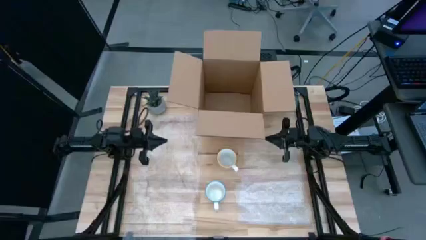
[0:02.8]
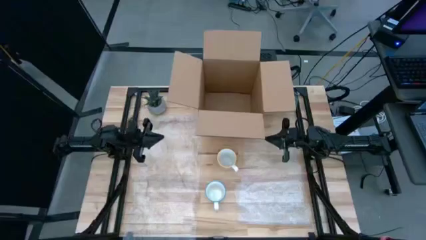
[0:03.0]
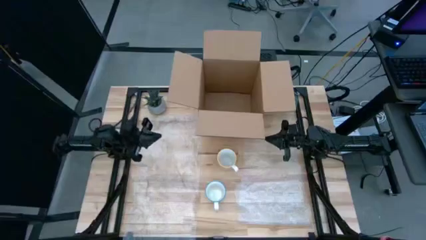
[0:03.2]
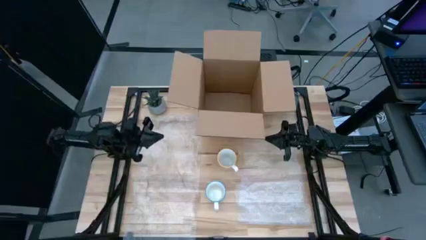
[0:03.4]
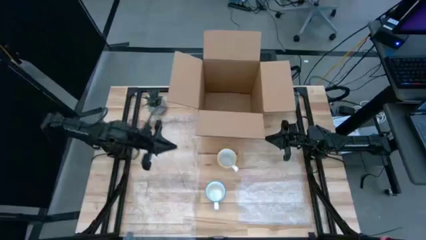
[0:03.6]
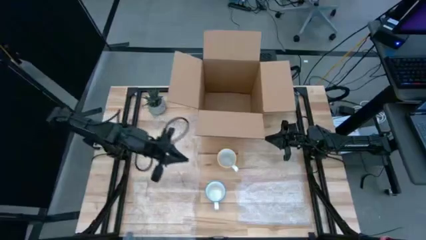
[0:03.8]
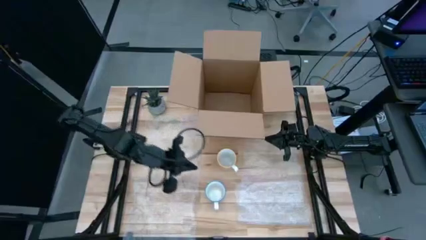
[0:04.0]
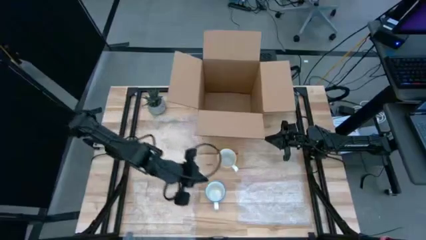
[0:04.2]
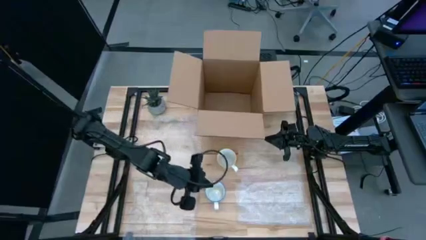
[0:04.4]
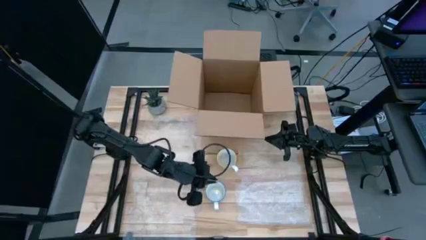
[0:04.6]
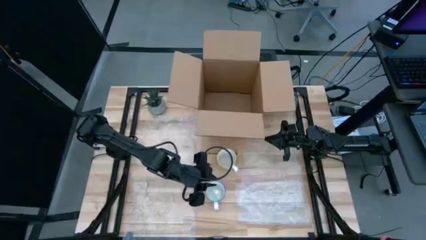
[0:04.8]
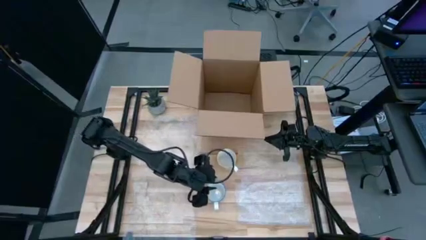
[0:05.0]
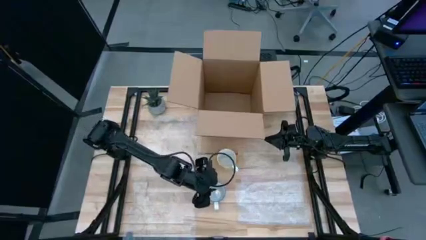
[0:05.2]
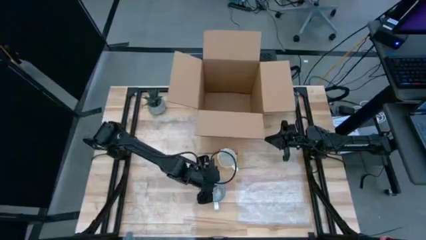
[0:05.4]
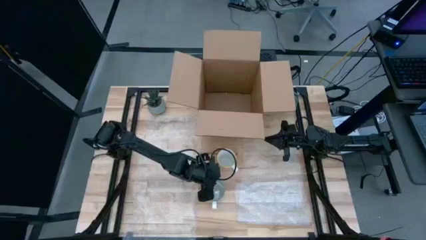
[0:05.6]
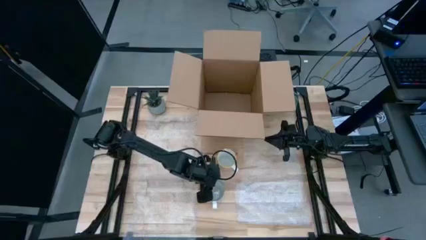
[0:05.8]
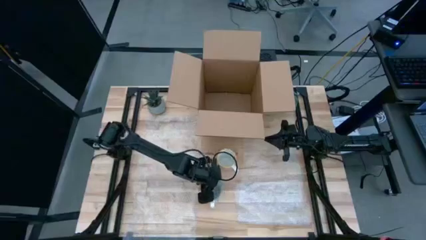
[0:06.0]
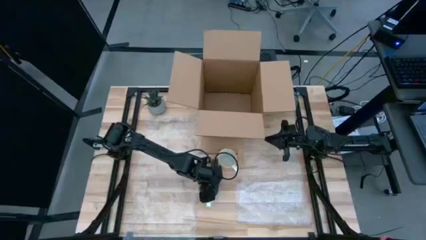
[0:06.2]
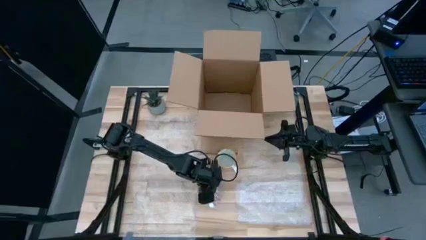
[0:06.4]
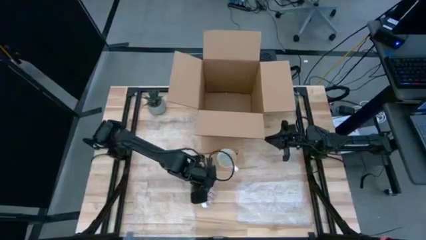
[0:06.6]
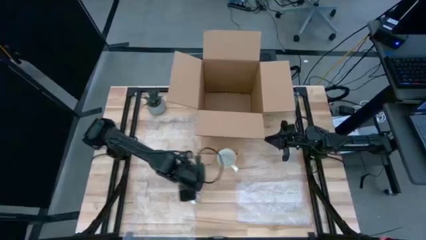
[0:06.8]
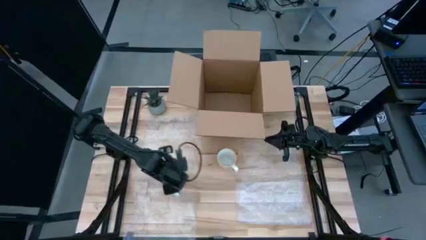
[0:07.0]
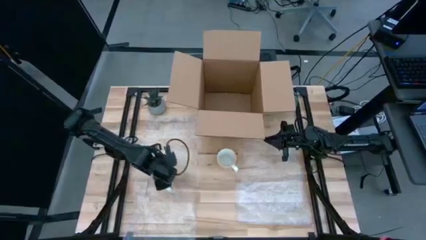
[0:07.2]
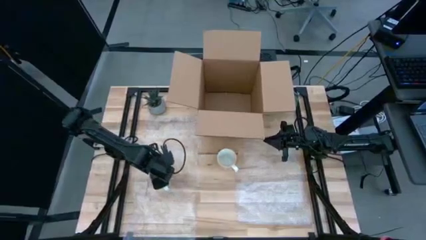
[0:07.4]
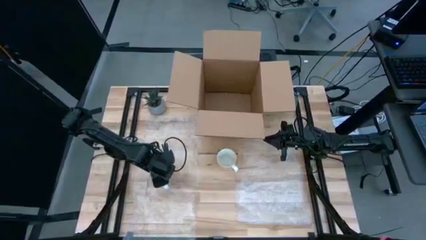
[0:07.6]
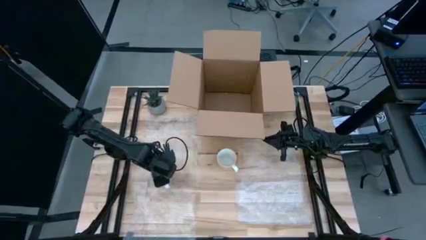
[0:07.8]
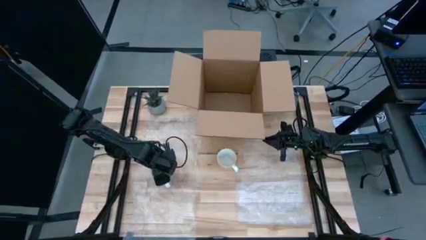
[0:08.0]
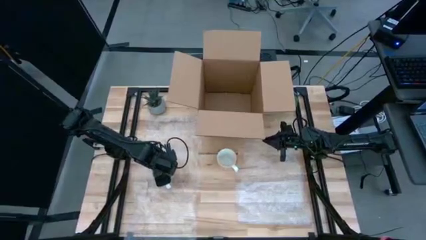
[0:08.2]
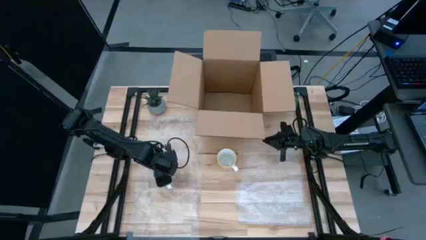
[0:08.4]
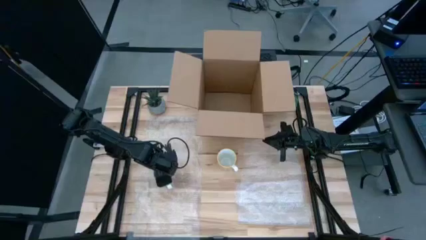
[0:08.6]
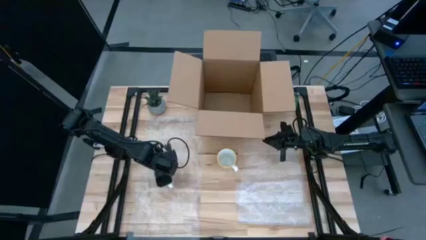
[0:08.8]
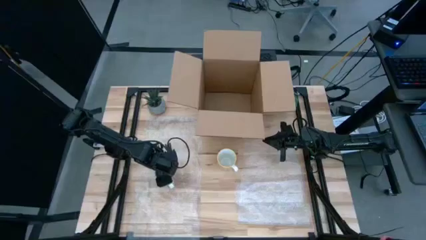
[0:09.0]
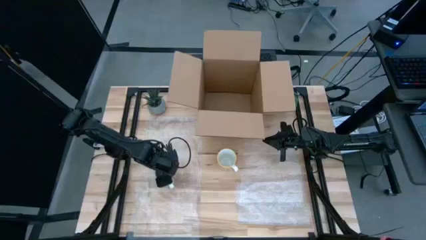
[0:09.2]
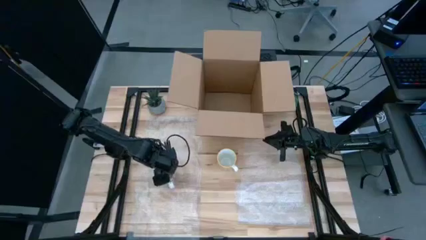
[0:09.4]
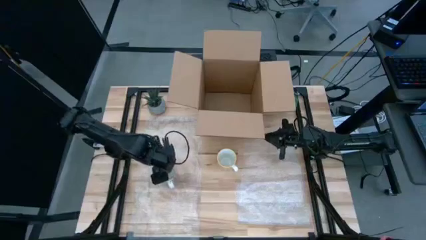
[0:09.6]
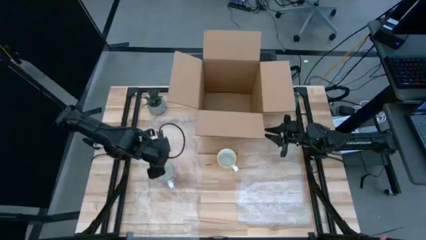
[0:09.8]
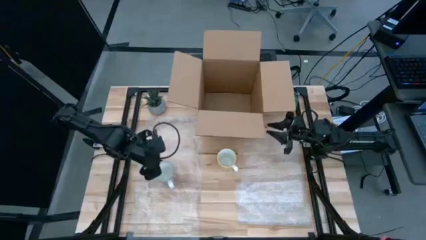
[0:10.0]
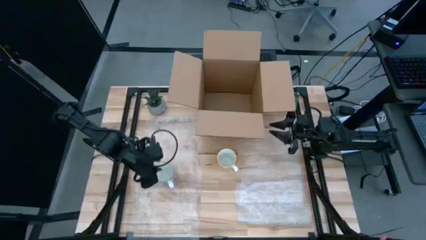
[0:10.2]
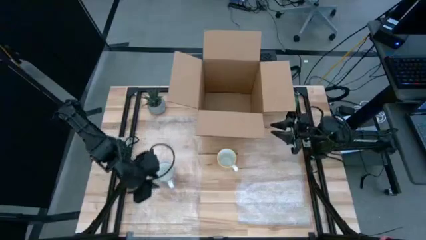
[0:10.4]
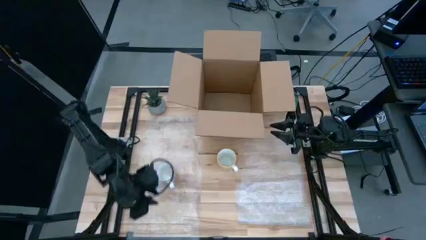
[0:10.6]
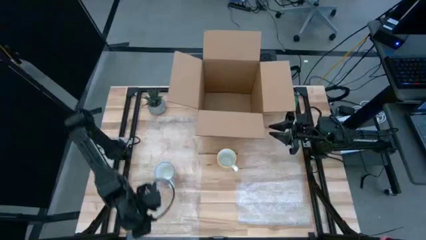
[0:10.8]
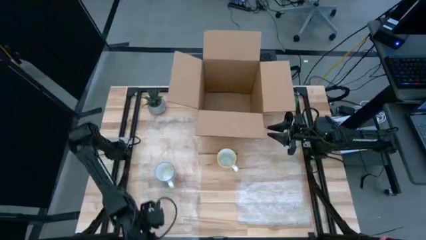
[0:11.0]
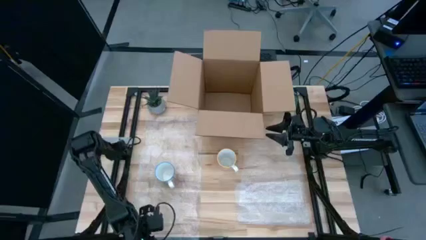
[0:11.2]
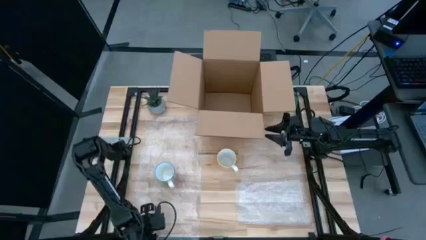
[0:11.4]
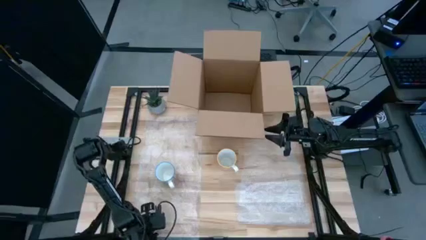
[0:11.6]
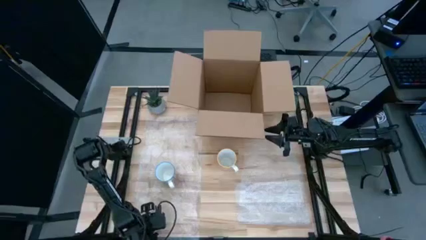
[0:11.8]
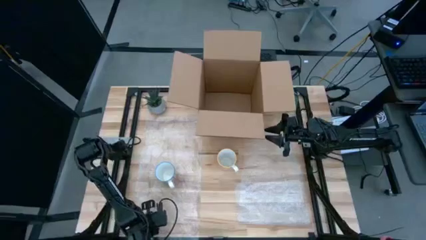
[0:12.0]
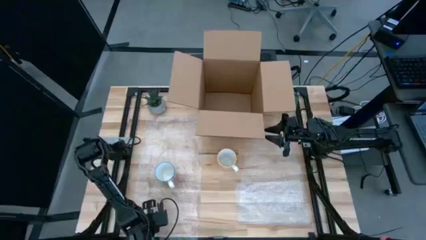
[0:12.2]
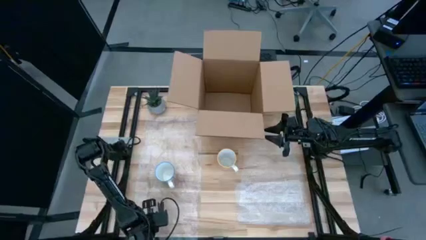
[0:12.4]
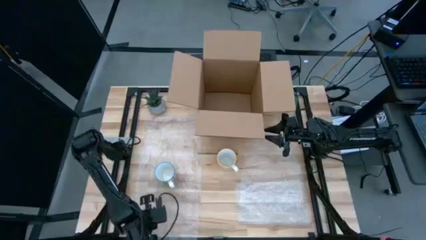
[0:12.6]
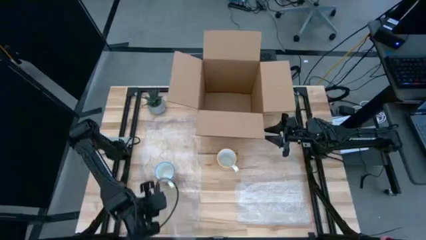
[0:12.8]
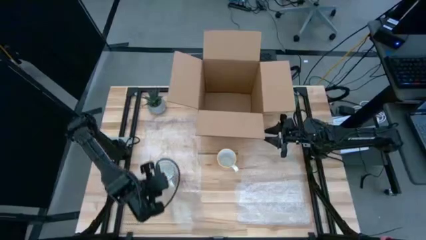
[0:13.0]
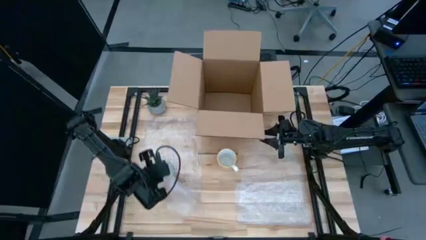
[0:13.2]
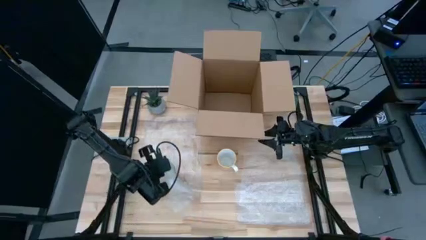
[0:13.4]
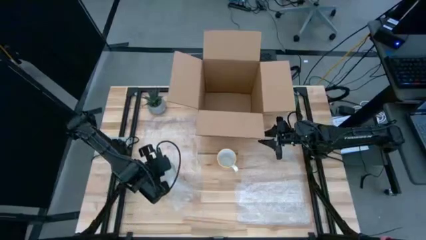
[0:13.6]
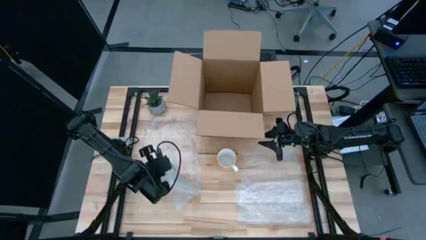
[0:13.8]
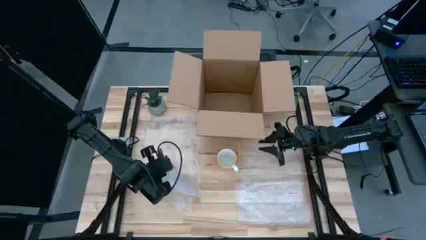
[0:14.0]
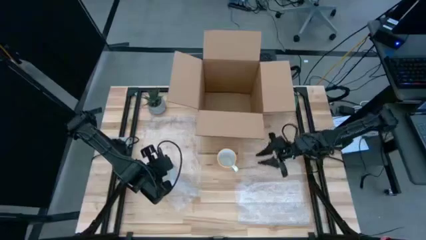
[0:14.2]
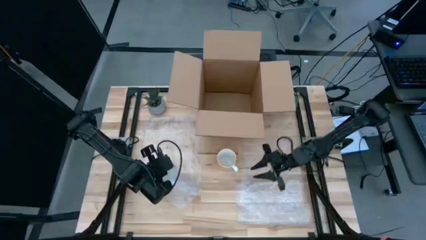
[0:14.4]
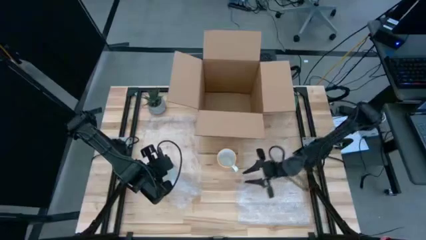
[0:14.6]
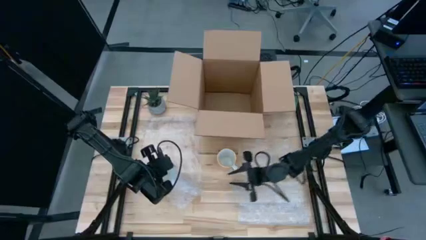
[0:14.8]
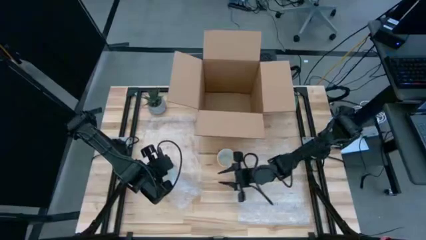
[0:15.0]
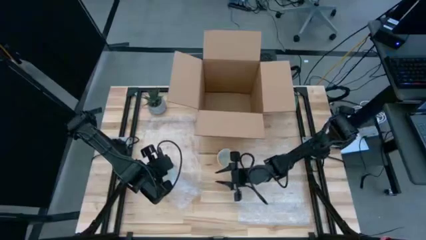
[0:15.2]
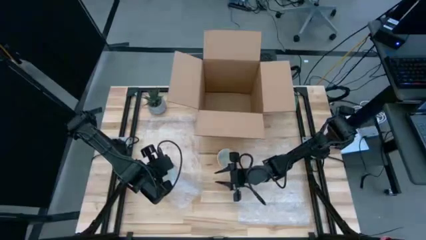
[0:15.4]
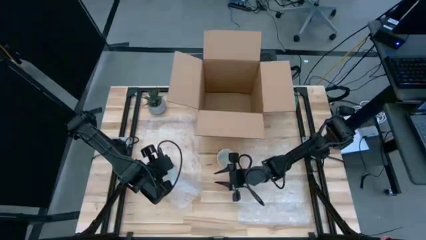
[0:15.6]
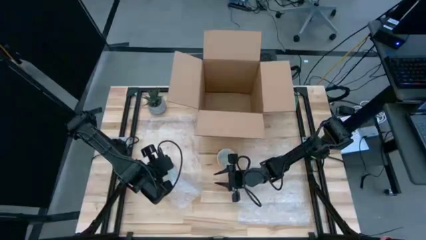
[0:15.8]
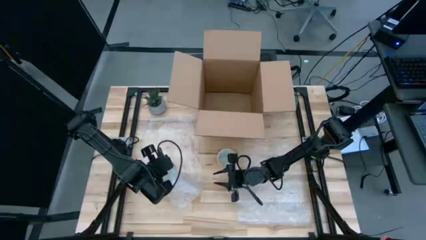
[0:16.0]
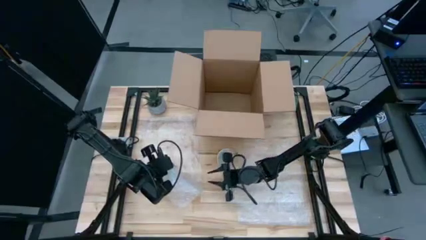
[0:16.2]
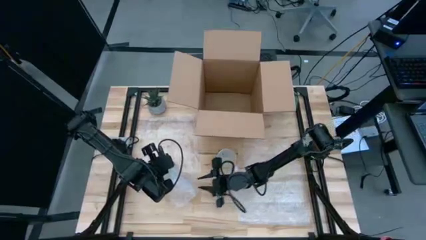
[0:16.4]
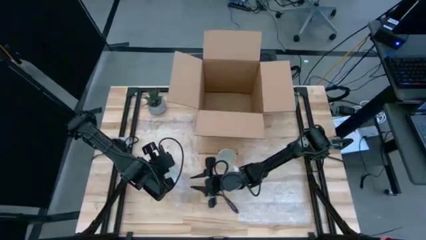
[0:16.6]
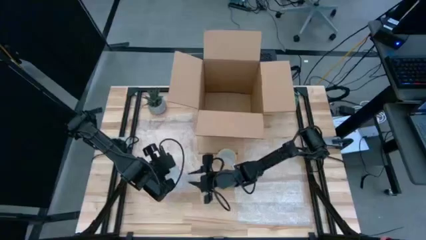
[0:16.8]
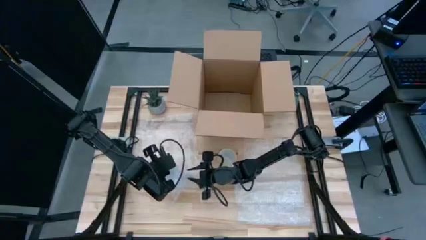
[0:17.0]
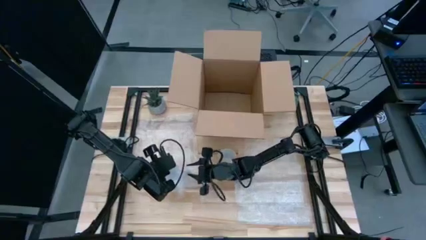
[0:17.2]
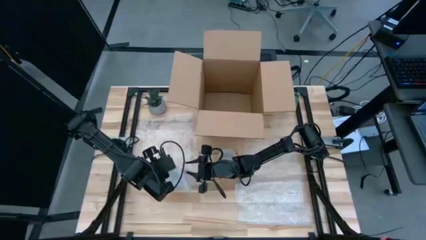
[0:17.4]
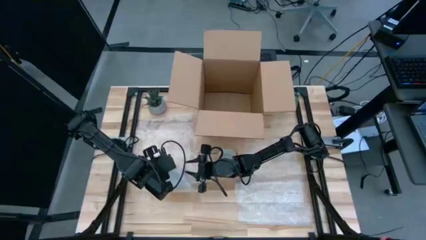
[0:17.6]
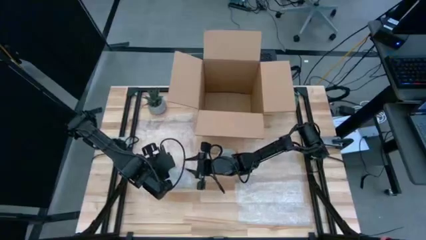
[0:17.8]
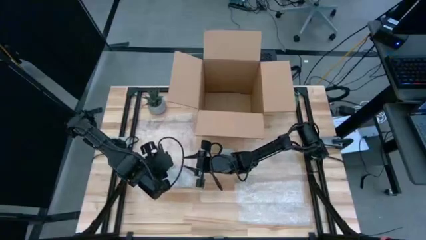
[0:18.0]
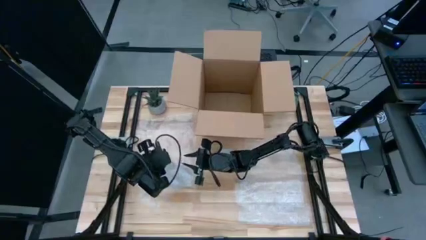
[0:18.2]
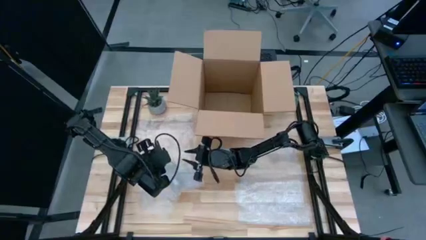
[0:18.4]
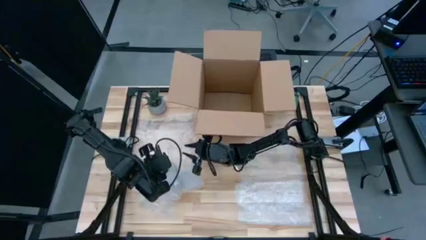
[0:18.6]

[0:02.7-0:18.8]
Task: wrap mug
Wrap the red mug with the bubble wrap
